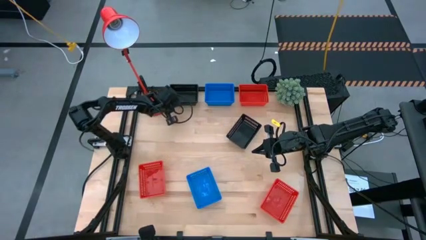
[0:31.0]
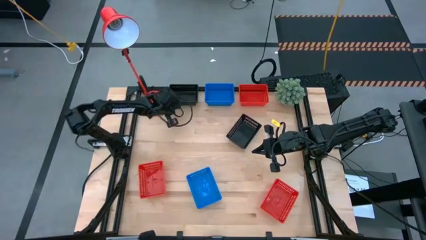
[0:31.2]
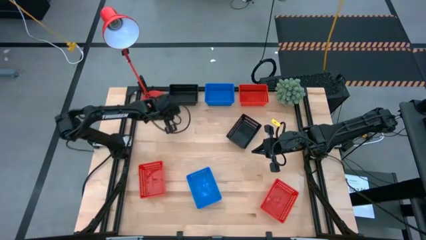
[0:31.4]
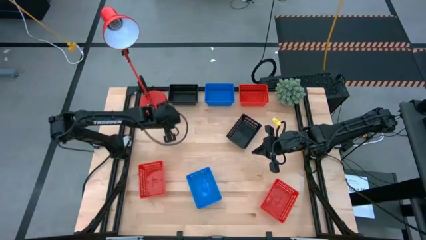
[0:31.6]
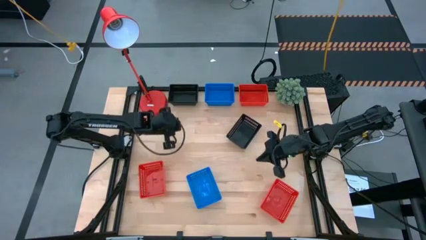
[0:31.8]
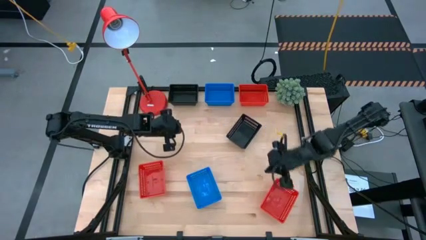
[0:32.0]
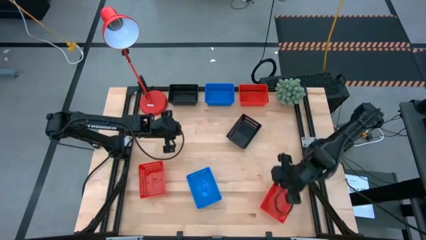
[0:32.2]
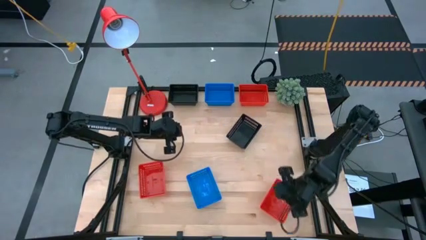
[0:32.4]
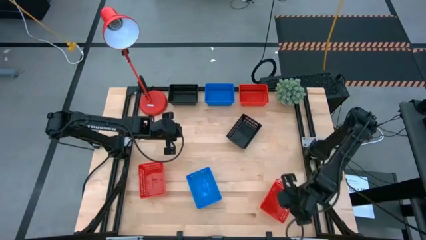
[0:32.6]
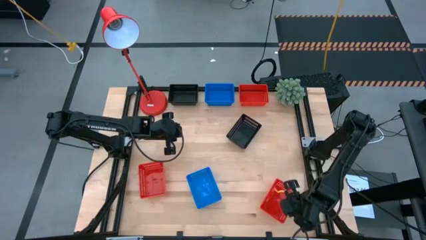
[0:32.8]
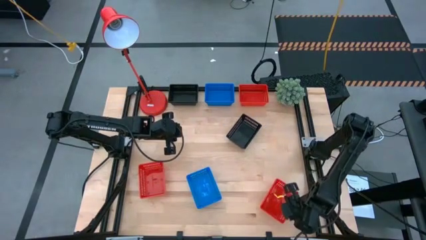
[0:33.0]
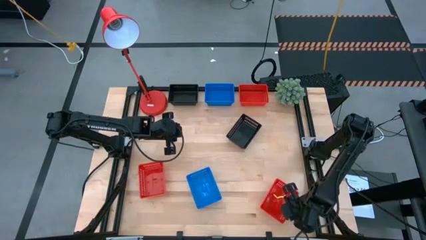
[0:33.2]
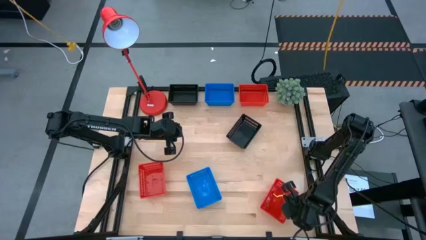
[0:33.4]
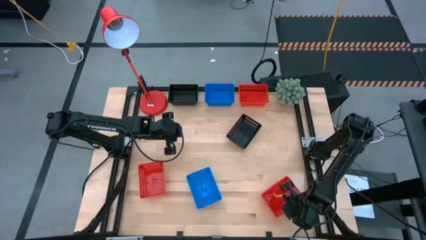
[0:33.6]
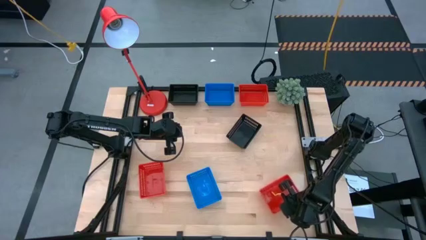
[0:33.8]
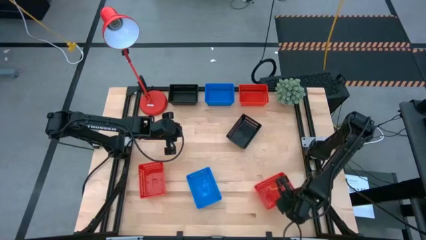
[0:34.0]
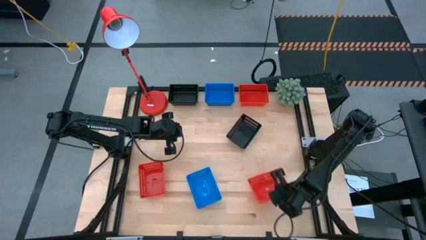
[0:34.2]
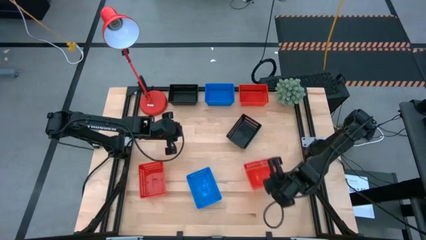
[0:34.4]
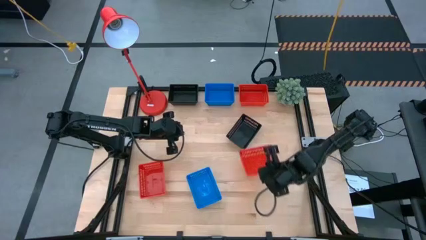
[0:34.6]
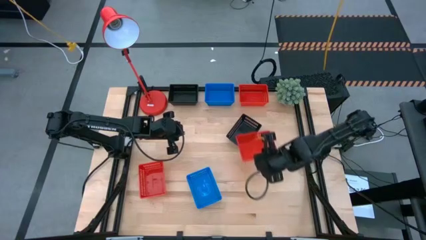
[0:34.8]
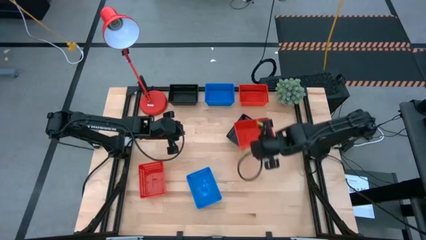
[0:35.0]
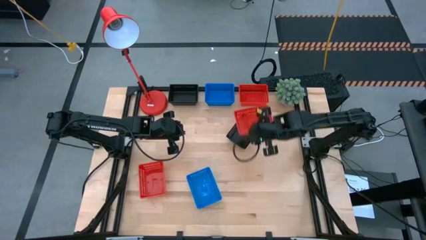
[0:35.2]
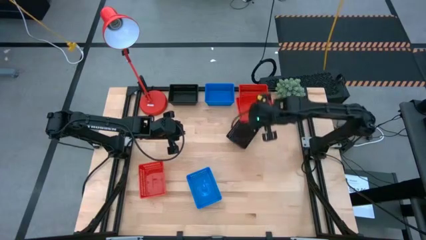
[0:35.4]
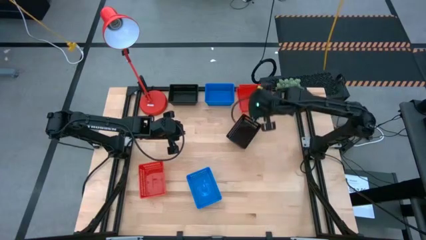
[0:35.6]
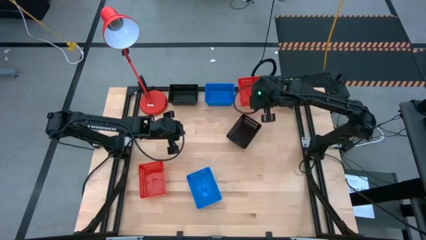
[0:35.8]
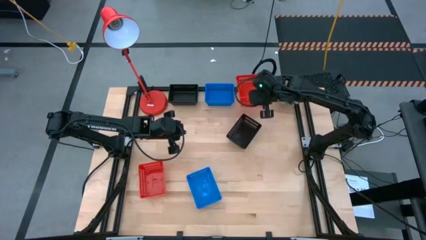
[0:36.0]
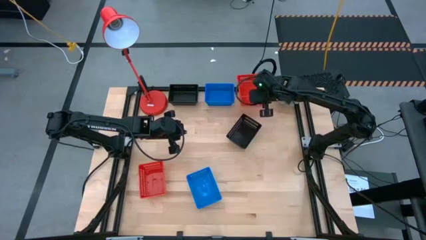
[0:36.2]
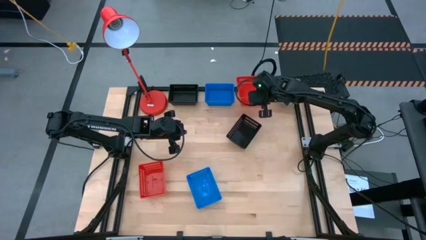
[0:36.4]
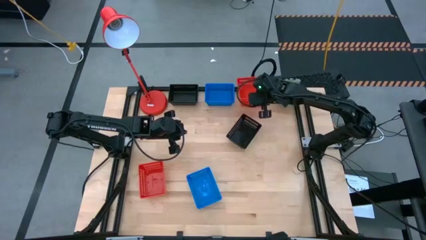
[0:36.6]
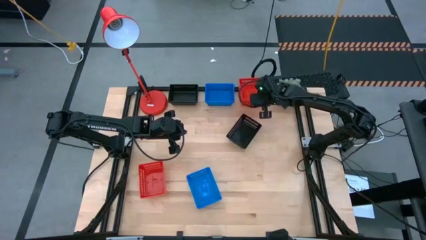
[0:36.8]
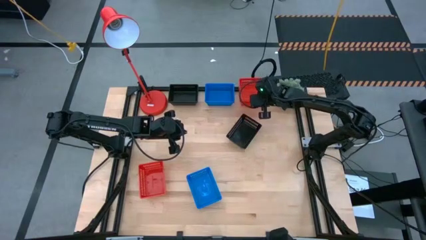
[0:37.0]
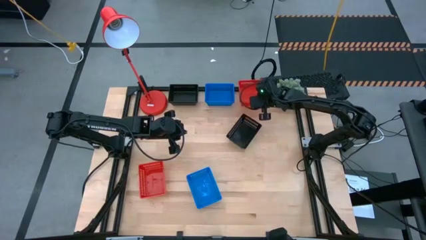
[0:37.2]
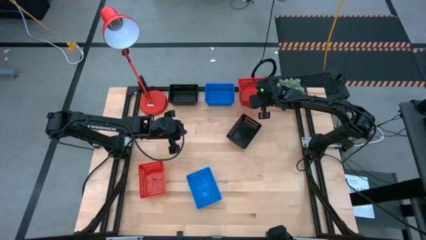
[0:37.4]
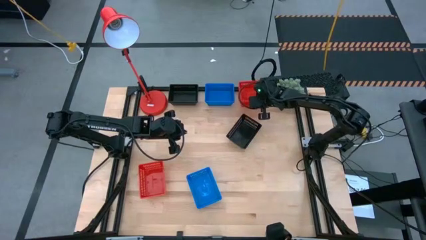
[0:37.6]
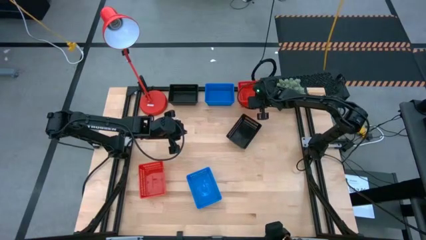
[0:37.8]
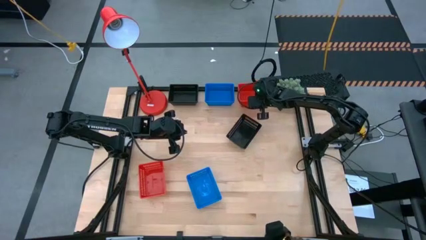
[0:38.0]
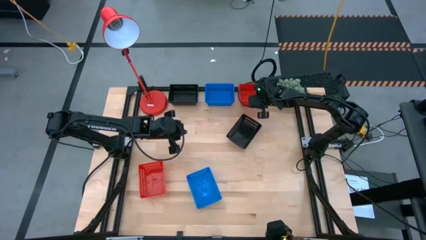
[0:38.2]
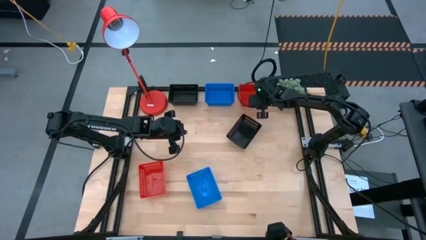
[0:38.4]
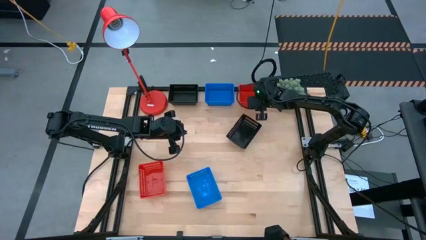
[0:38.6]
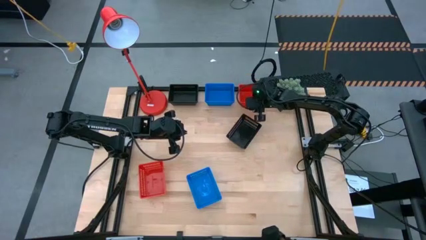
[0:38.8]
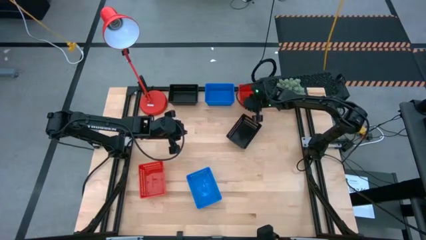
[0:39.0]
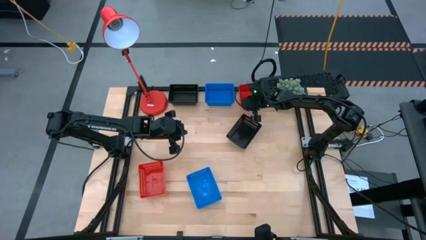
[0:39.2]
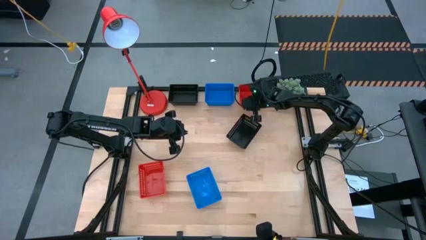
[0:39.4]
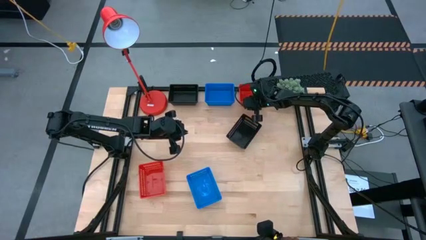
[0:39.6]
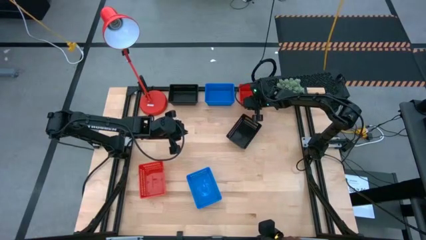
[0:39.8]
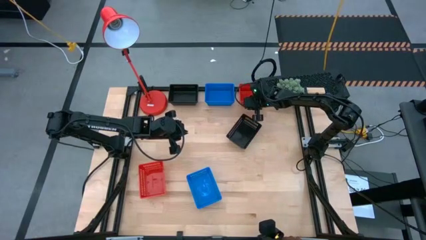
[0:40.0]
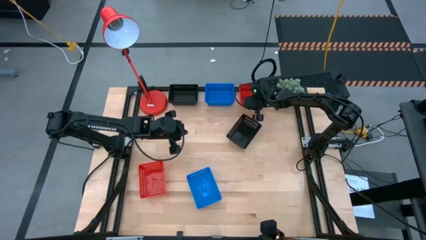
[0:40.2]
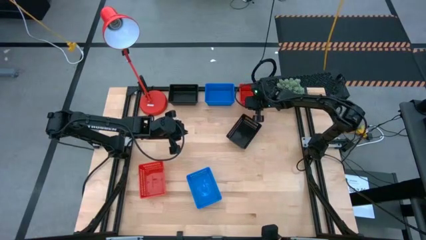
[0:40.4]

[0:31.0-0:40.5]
Stack the bottom right red bin on the top red bin

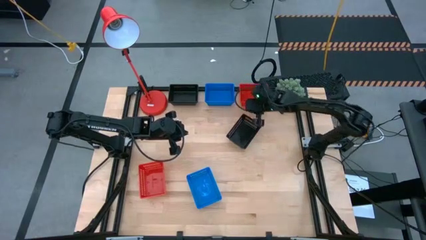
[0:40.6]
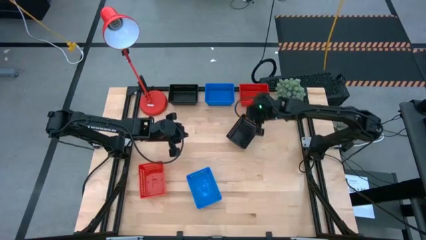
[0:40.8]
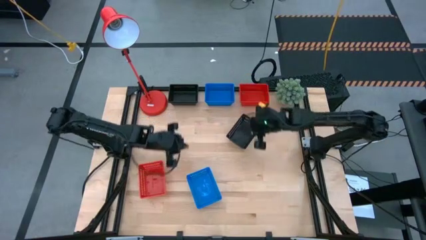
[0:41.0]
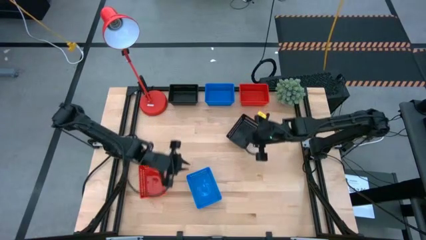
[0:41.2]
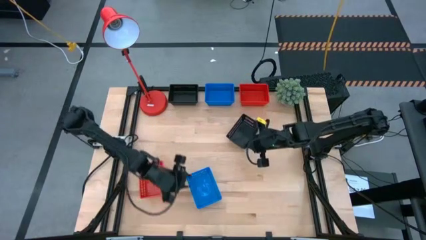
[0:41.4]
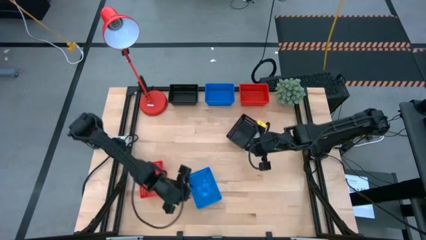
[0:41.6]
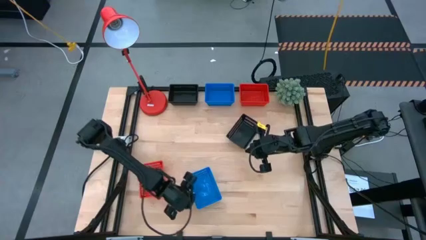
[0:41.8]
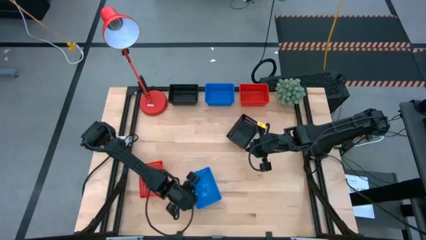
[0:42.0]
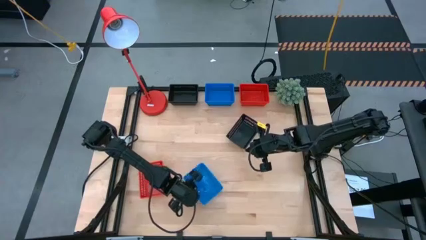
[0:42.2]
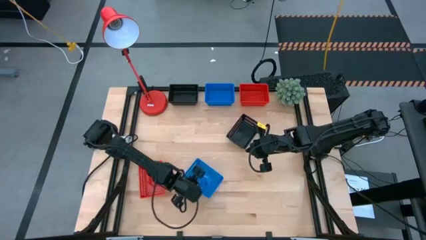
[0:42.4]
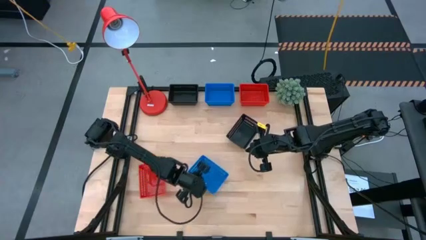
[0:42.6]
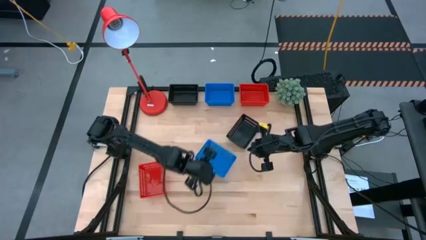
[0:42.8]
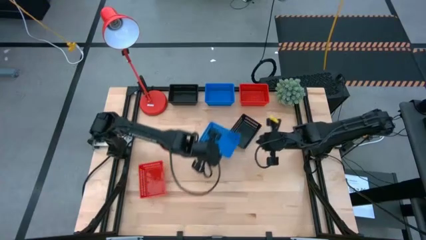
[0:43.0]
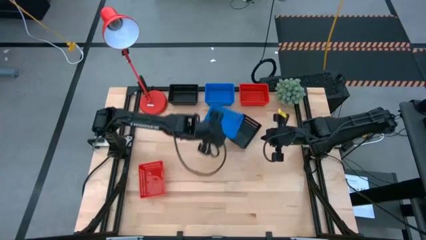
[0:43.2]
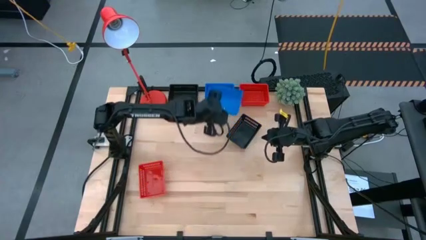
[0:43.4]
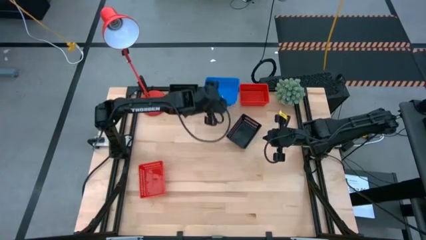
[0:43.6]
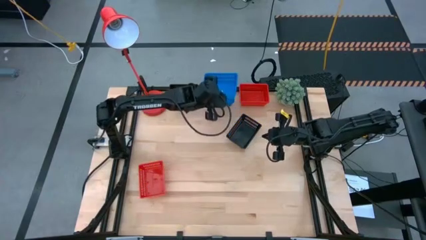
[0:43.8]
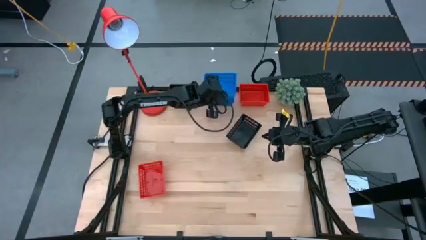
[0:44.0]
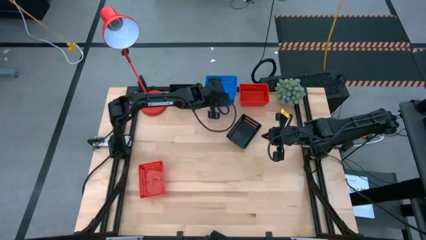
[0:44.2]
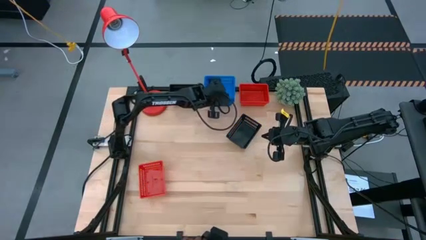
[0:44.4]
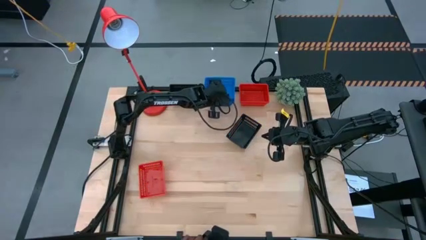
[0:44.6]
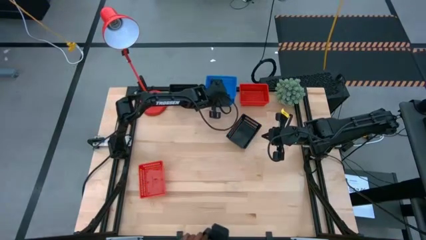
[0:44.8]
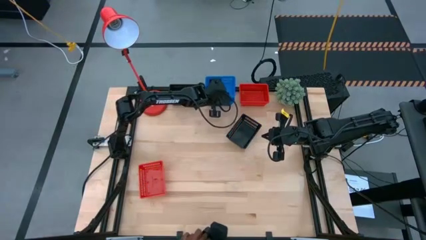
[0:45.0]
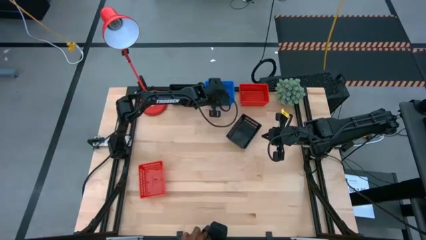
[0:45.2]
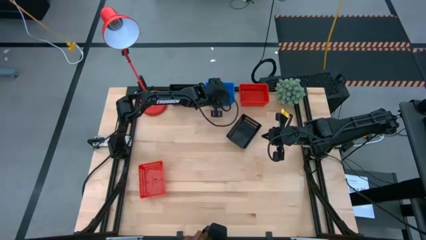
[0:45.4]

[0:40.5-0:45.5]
Stack the bottom blue bin on the top stacked blue bins
